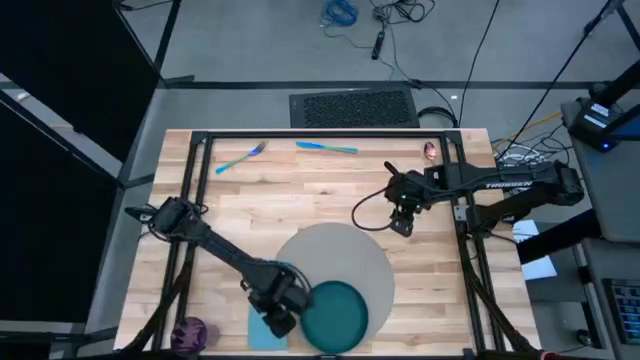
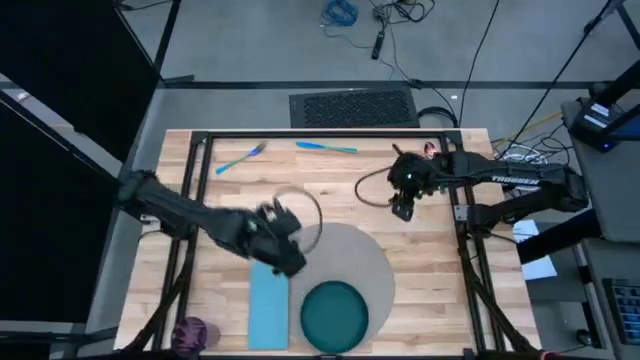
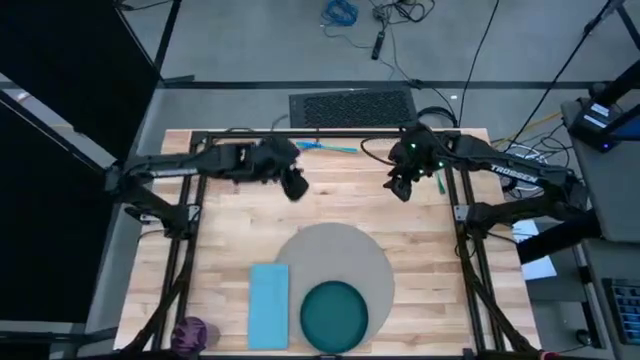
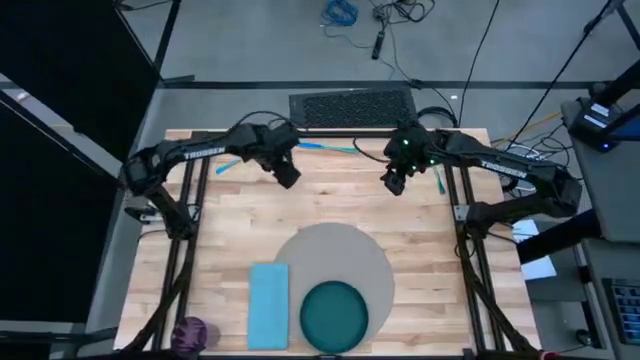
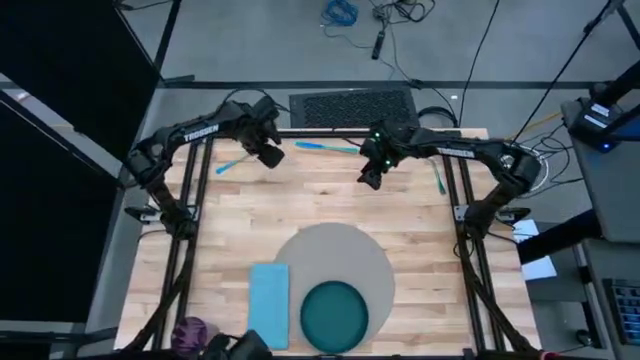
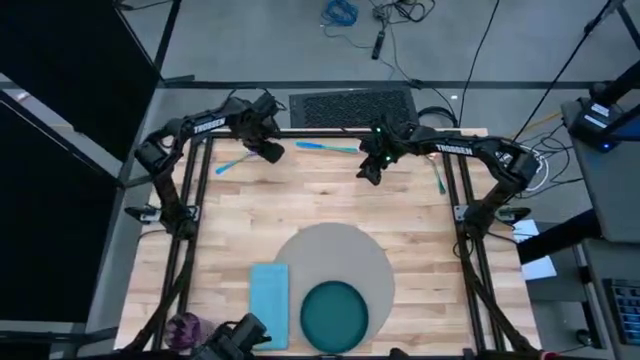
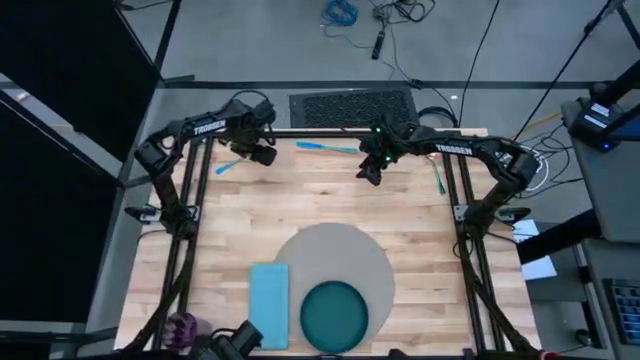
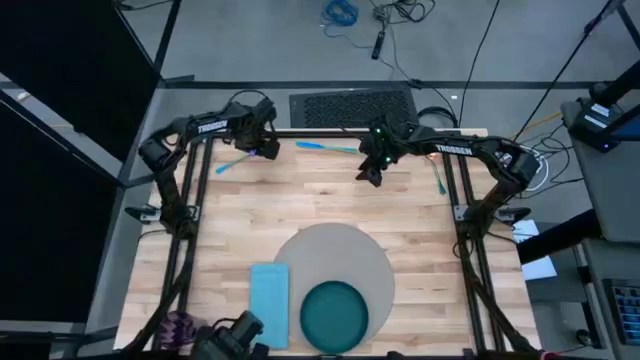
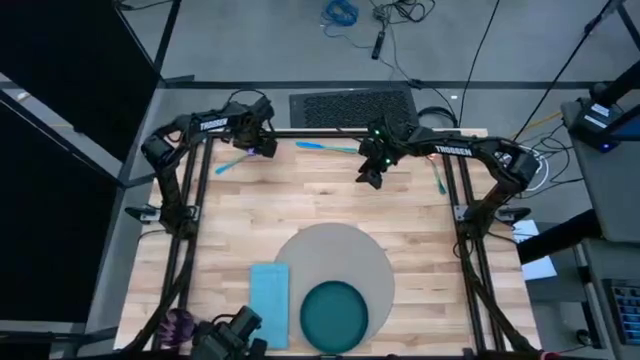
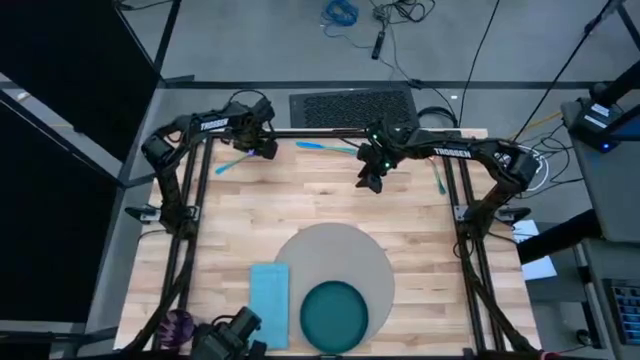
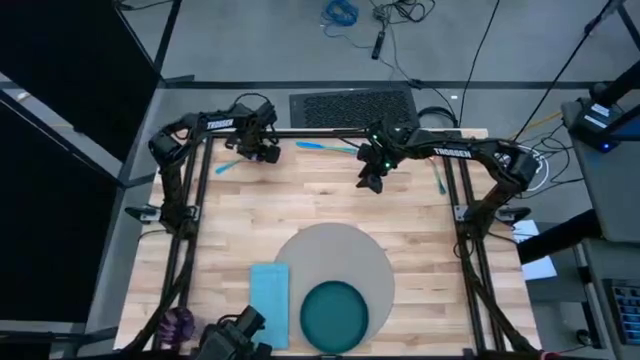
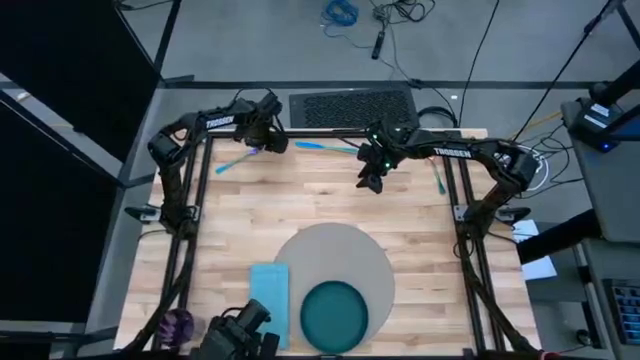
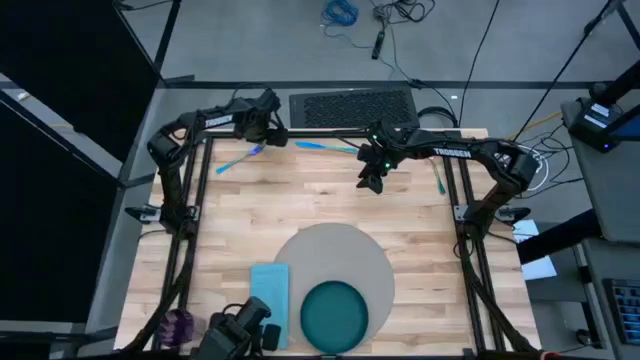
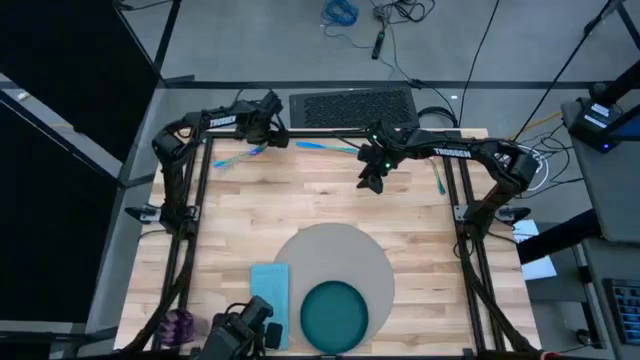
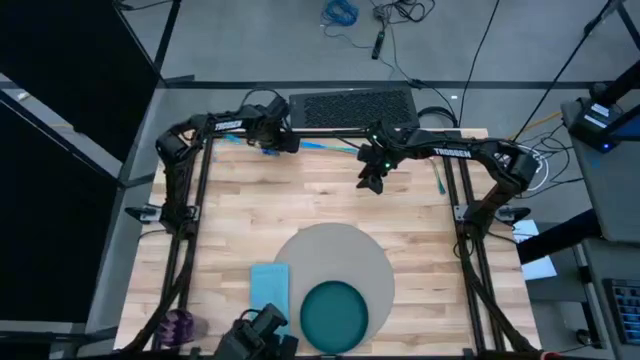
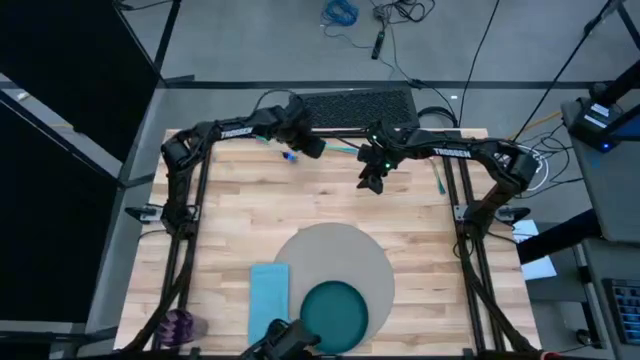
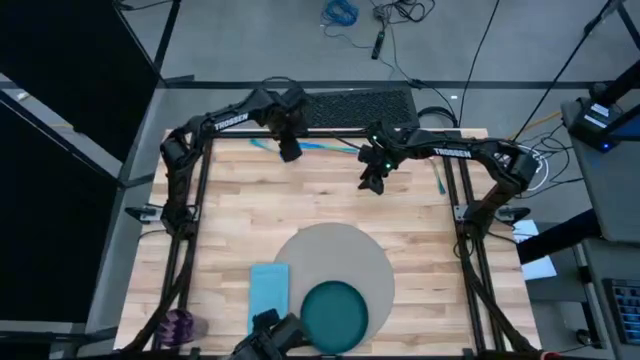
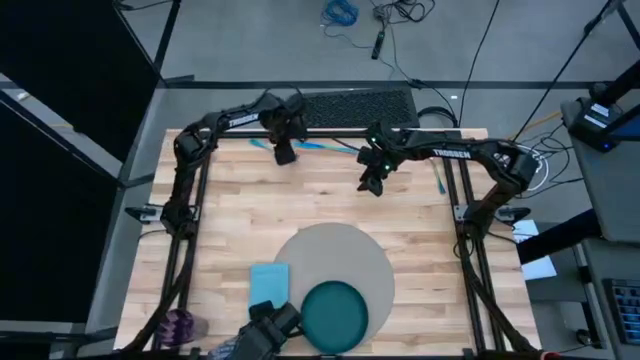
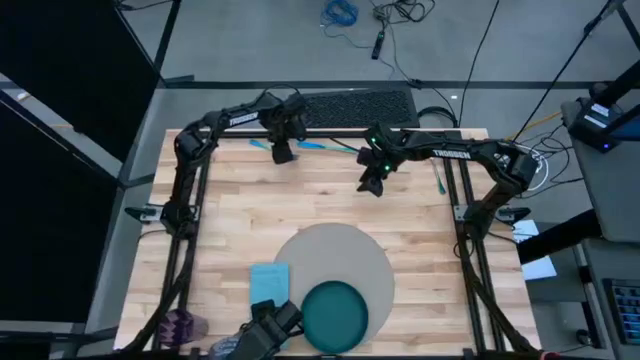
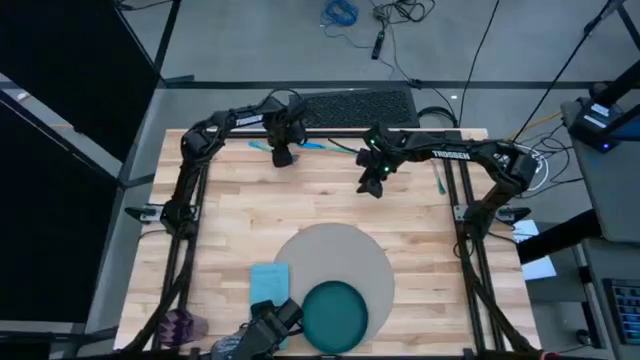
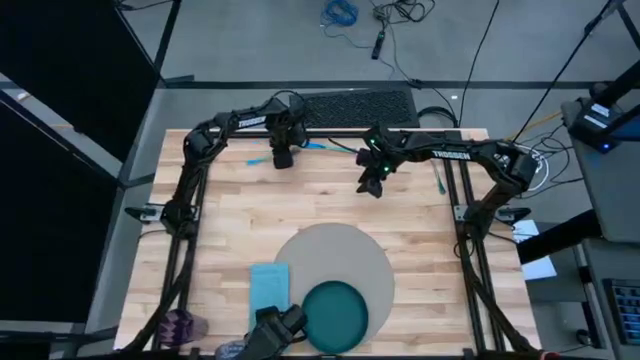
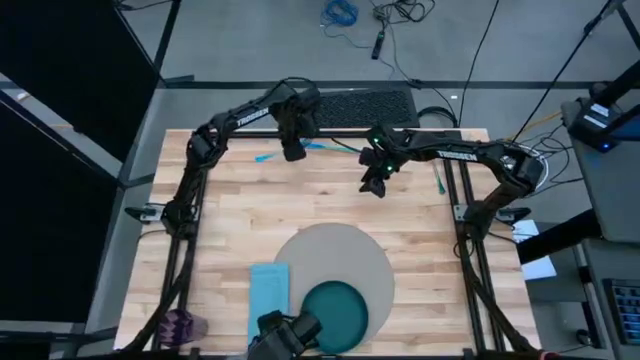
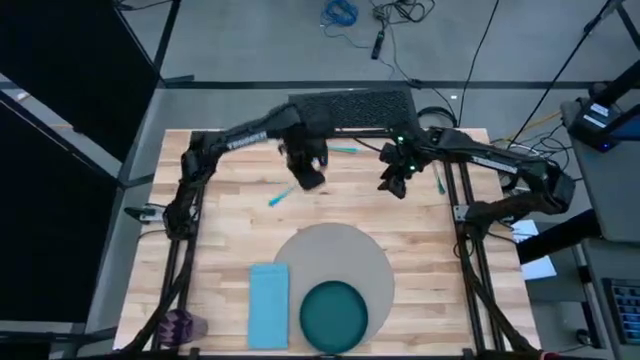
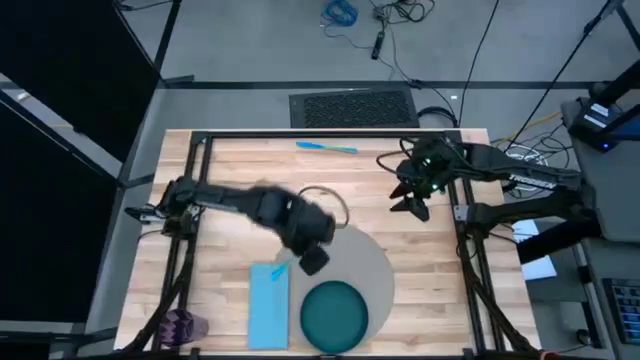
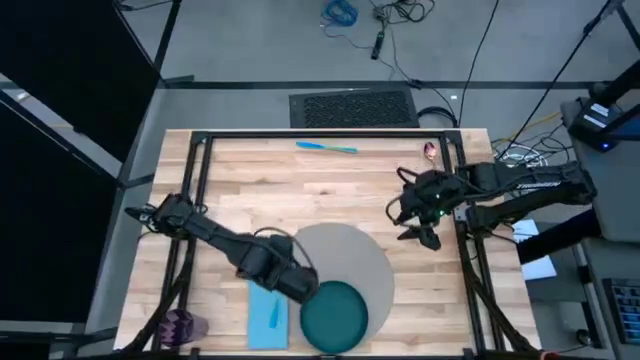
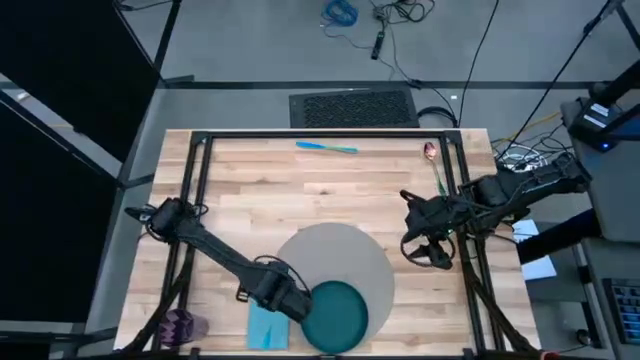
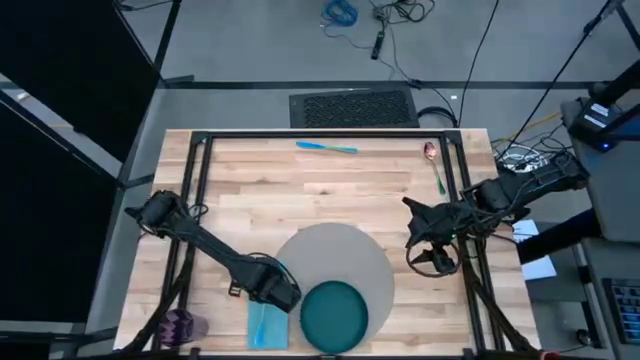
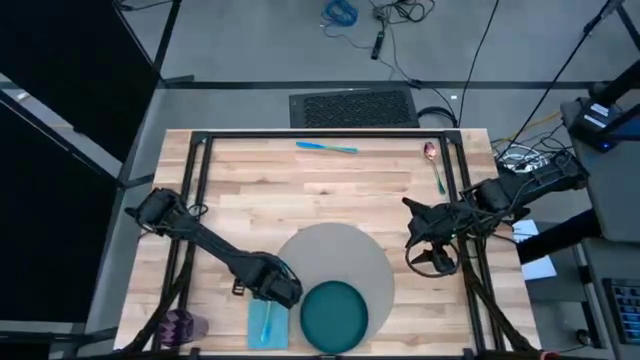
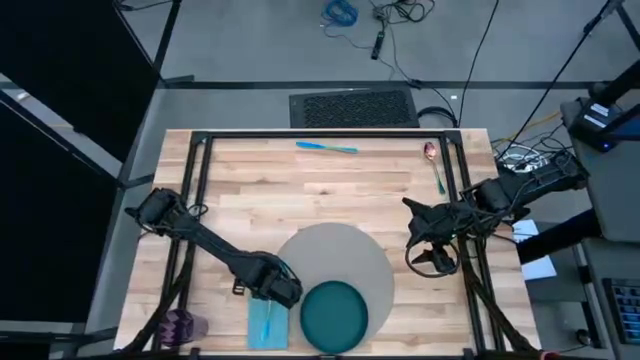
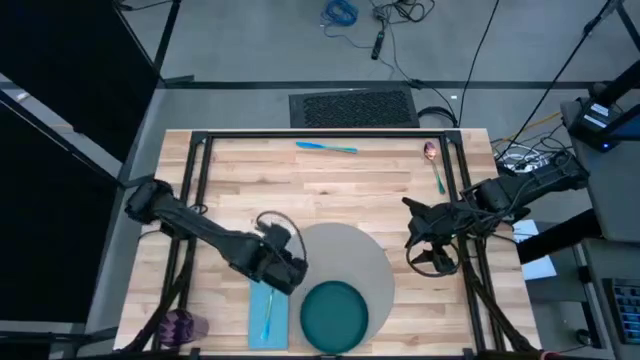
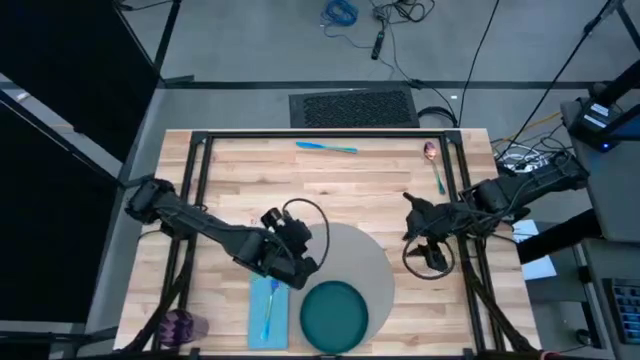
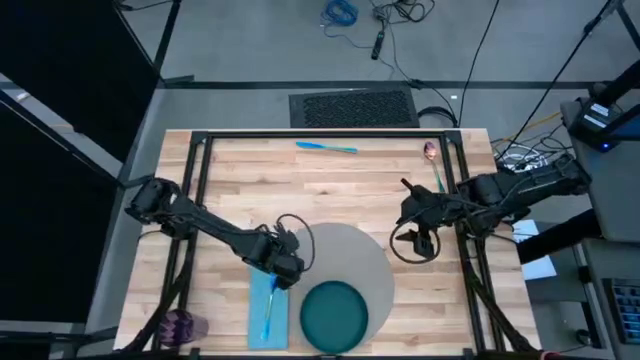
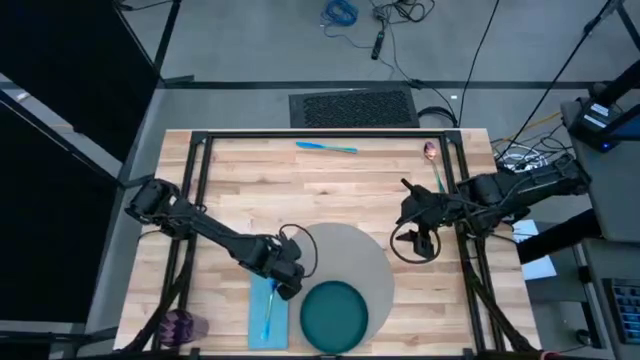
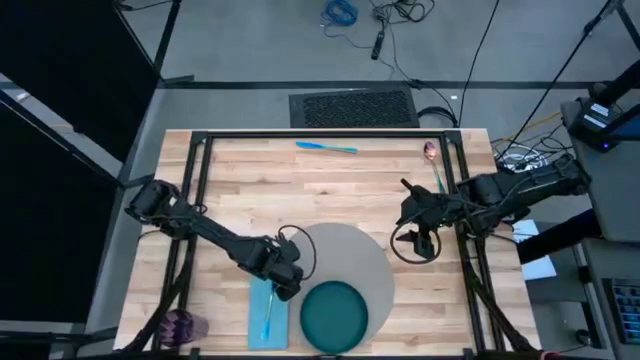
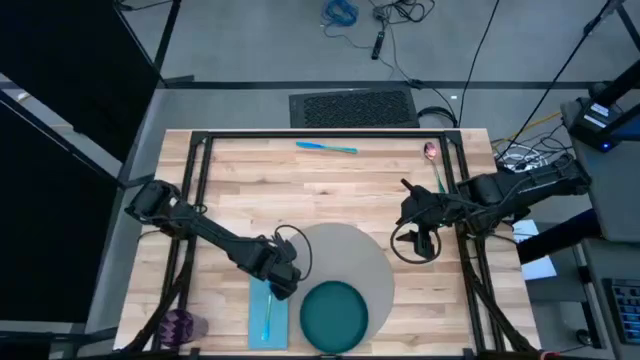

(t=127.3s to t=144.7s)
Task: Set table place
Put the blue fork on the blue napkin

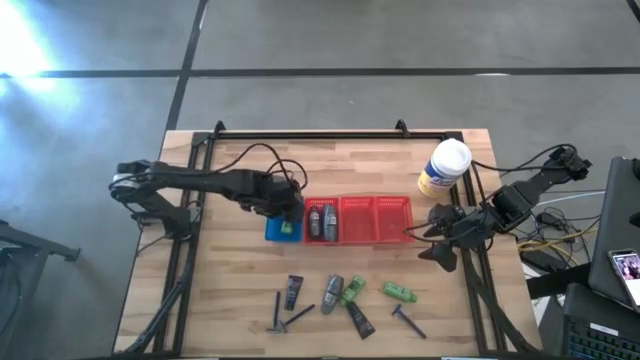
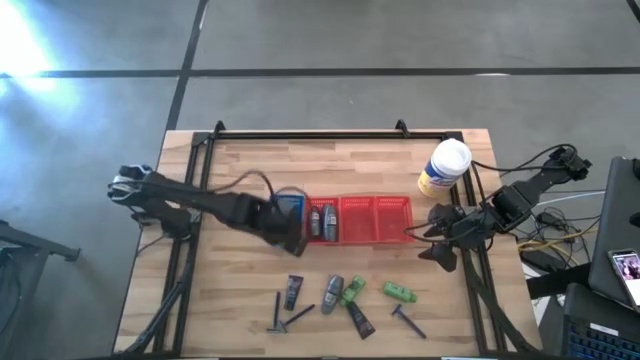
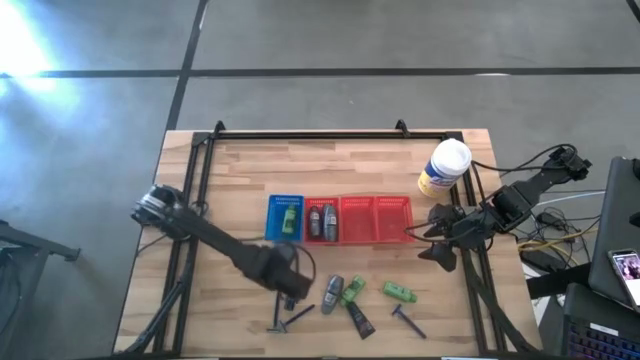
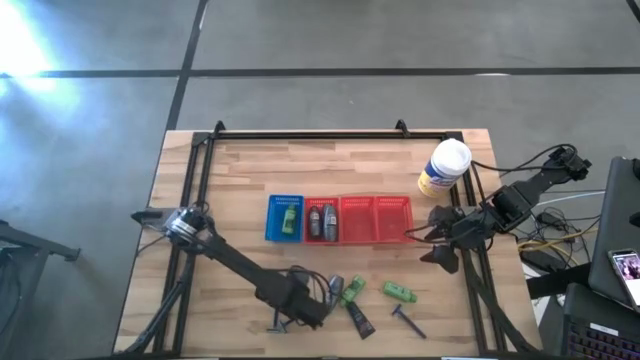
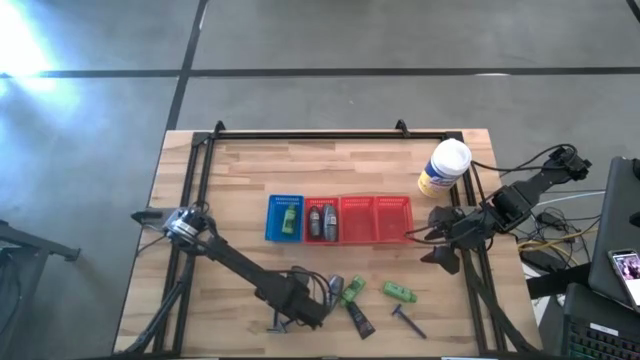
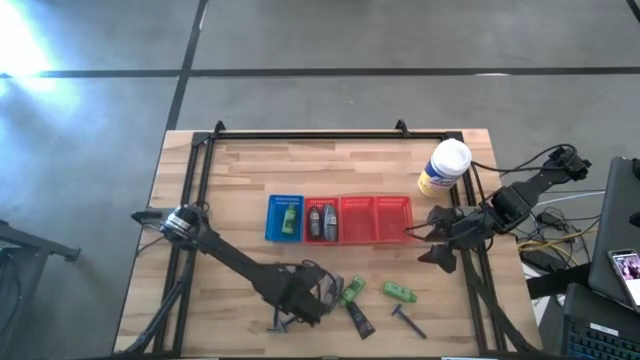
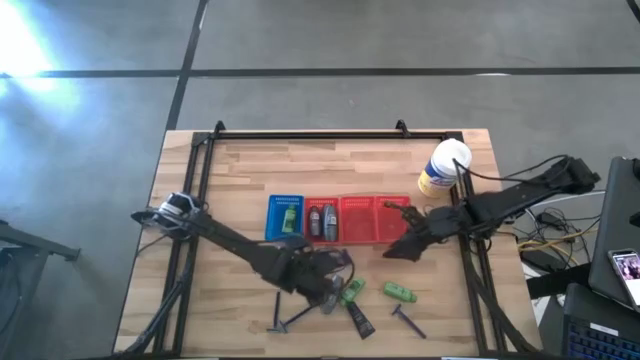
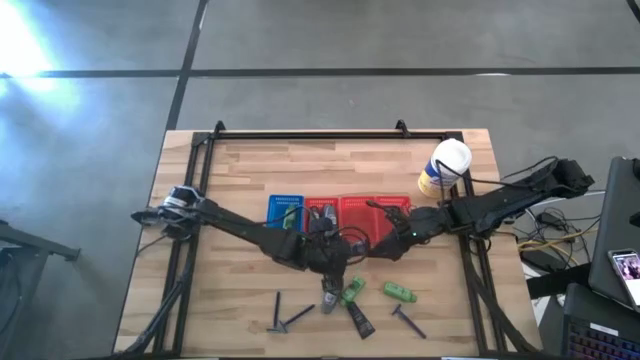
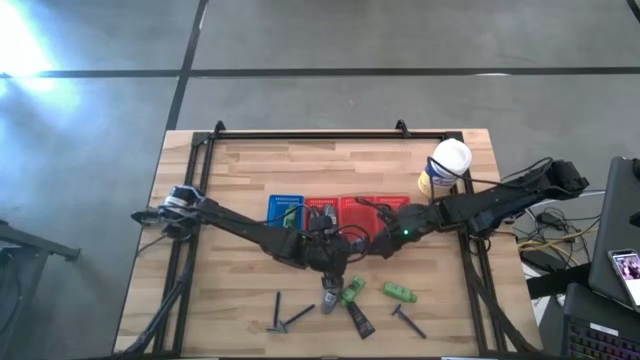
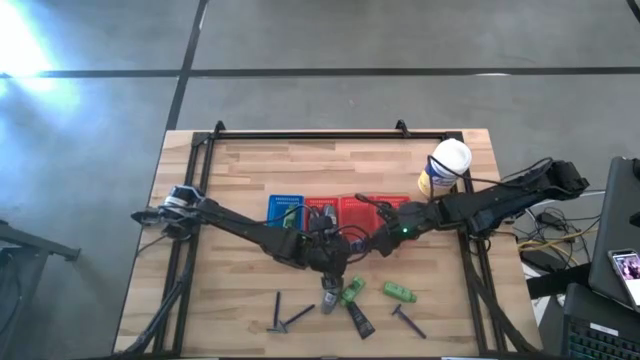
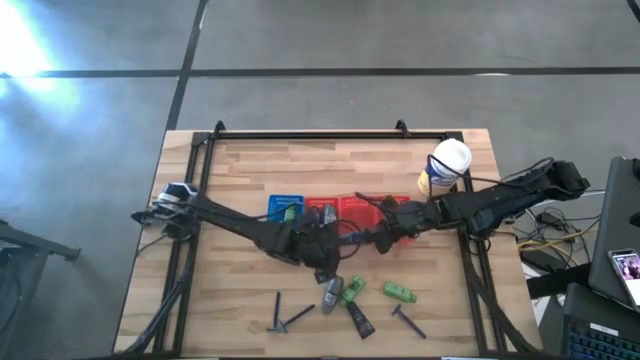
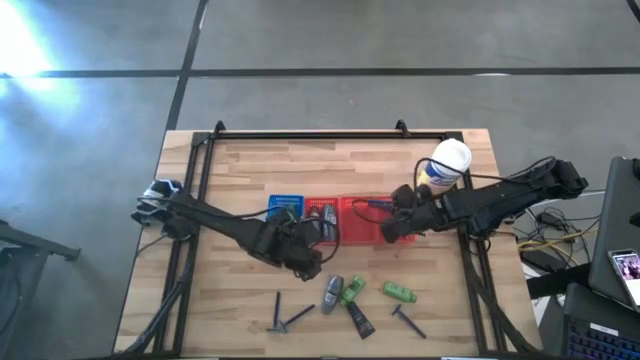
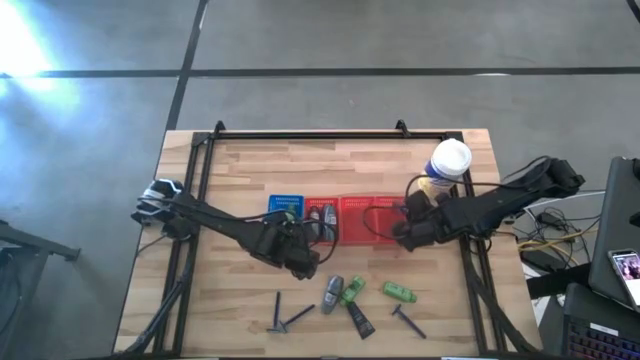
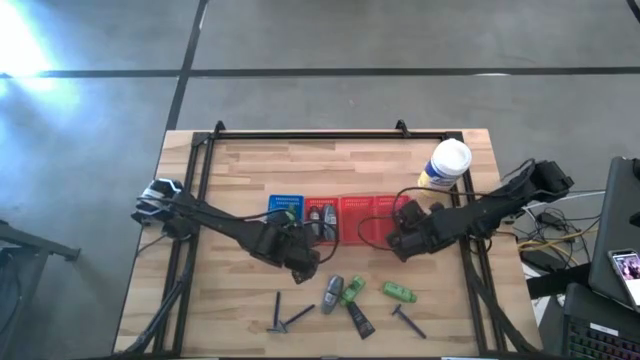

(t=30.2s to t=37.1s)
Task: Pick & Place Travel size toiletries
Put the blue shave cream into the right red bin
